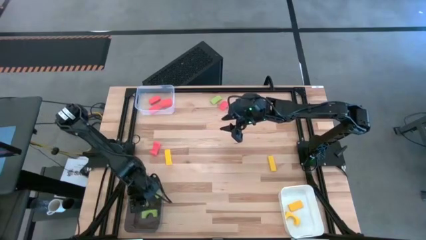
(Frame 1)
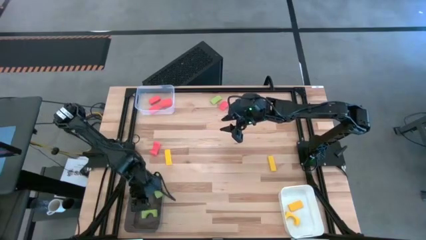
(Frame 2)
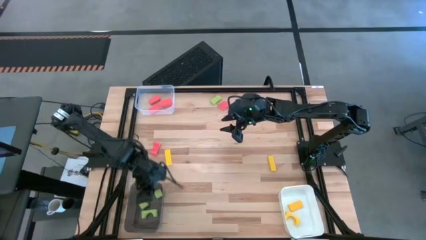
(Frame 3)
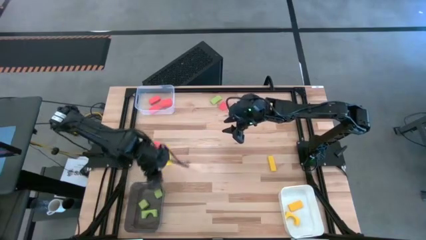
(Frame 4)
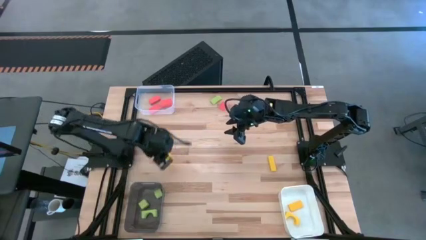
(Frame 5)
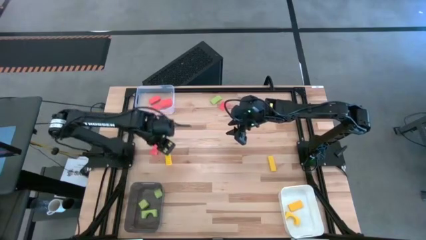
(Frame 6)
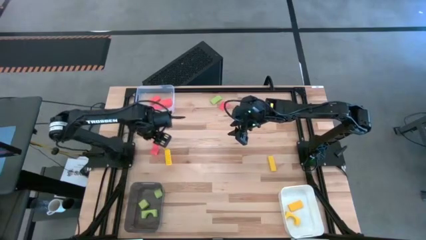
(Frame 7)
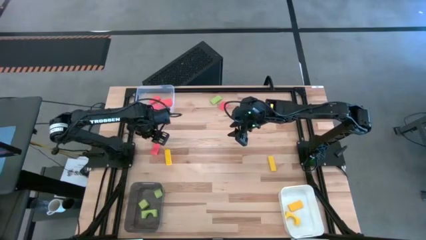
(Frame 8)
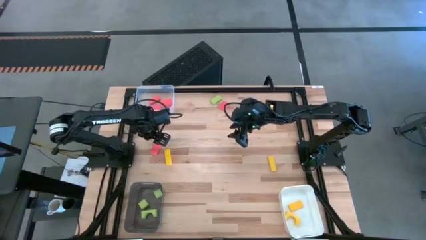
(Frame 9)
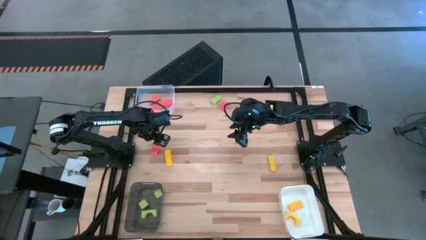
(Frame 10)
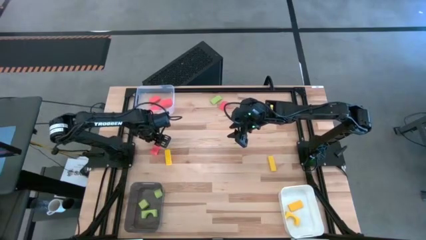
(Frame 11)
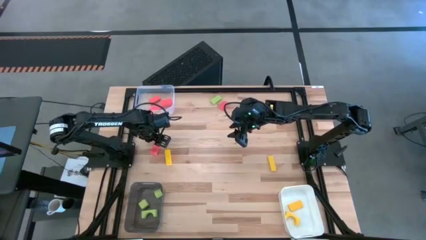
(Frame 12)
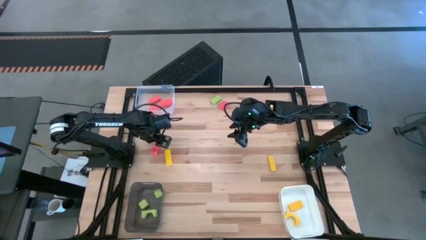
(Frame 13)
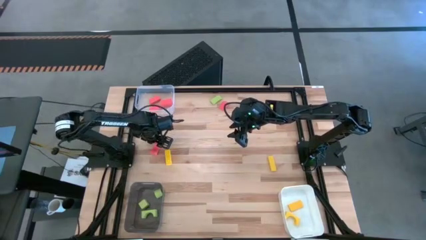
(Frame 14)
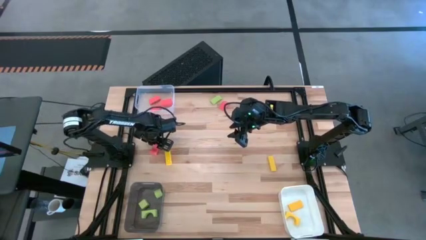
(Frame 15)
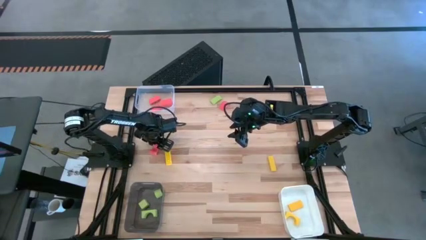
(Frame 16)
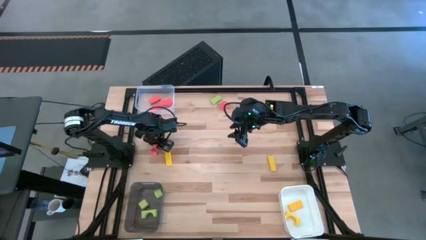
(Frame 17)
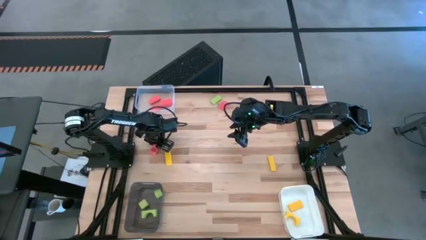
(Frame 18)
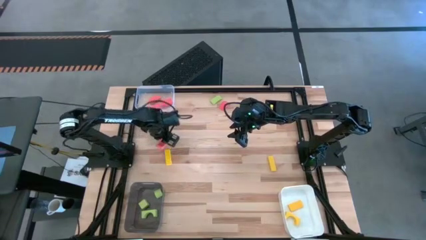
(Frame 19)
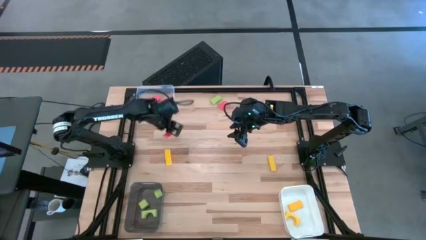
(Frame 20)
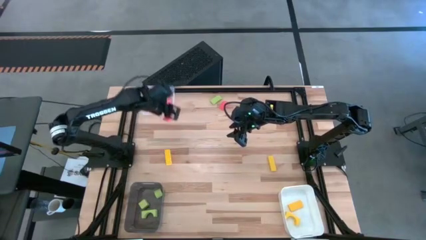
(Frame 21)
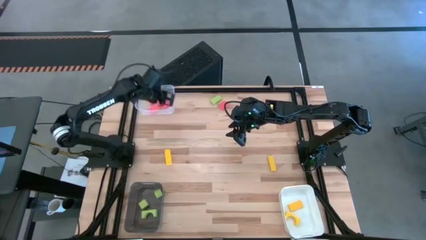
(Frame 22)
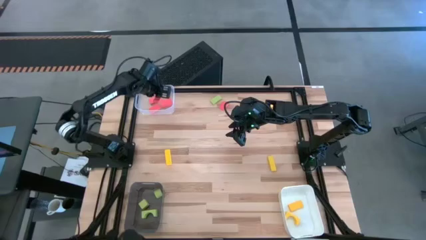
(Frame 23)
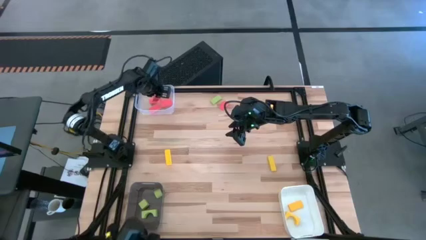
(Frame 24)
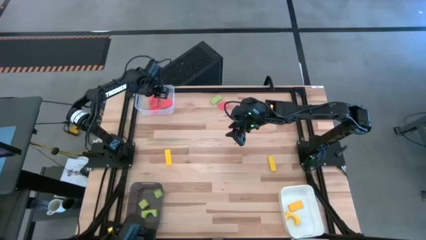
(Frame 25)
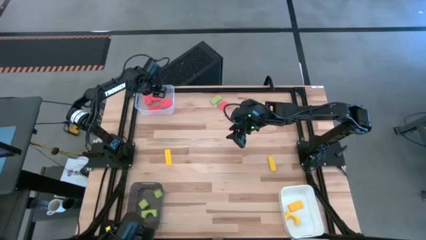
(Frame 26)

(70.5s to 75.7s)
Task: Sort & place blocks by color
Put the orange block into the transparent white bin

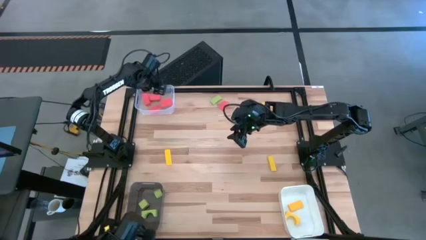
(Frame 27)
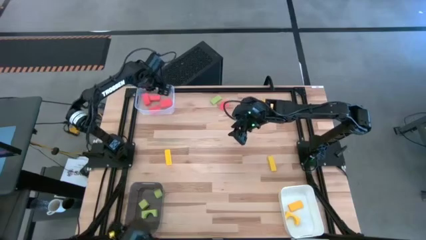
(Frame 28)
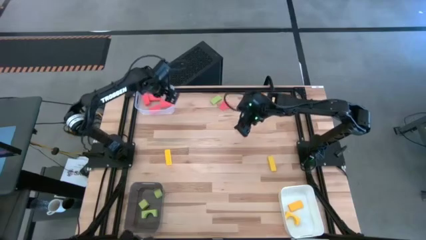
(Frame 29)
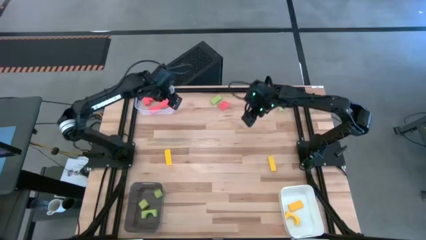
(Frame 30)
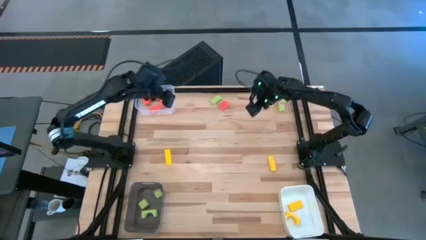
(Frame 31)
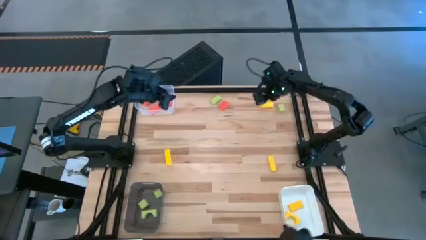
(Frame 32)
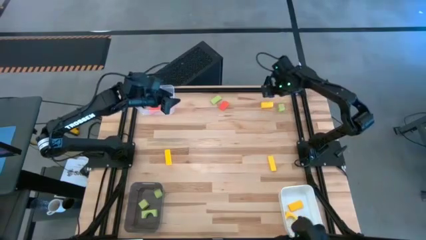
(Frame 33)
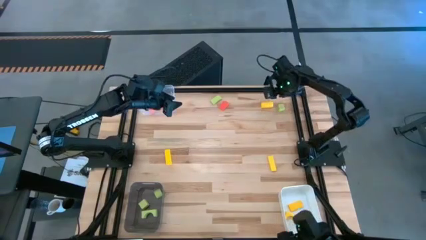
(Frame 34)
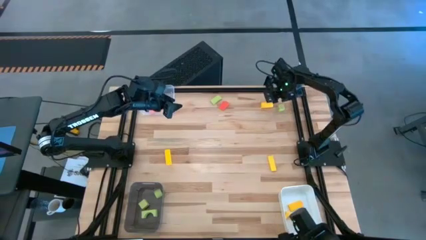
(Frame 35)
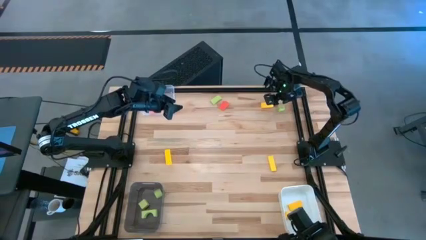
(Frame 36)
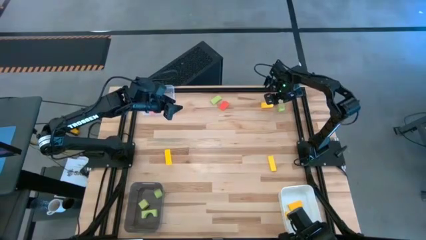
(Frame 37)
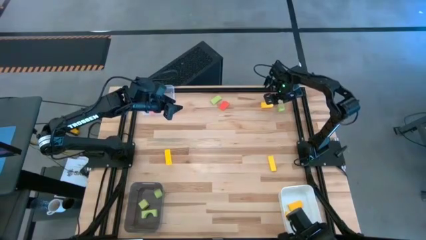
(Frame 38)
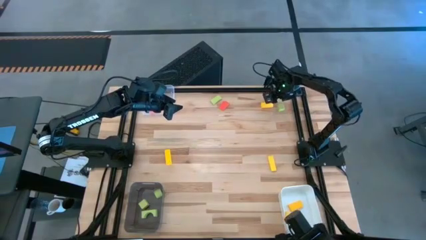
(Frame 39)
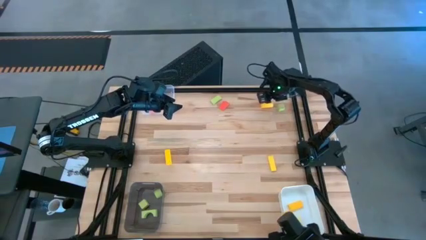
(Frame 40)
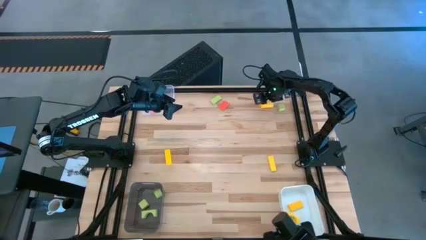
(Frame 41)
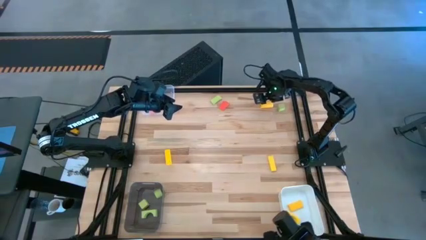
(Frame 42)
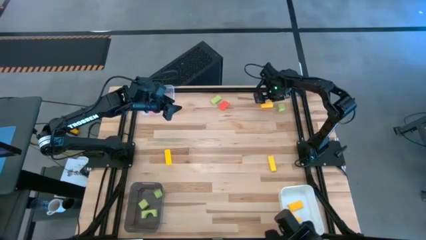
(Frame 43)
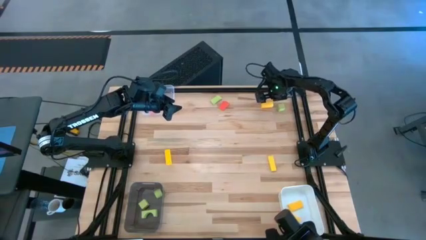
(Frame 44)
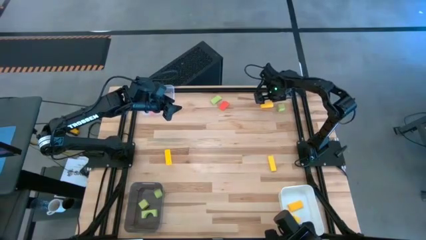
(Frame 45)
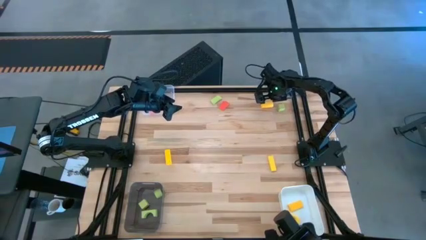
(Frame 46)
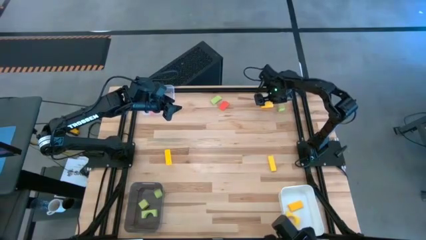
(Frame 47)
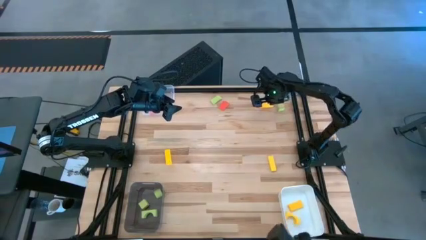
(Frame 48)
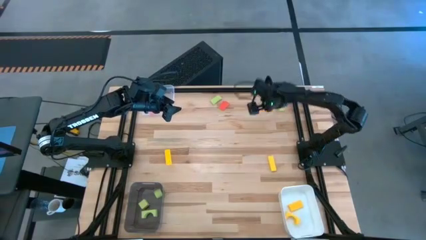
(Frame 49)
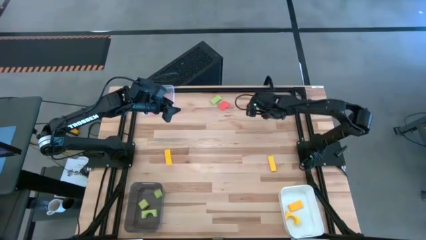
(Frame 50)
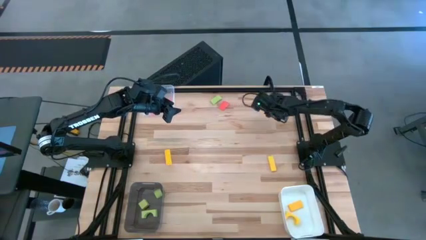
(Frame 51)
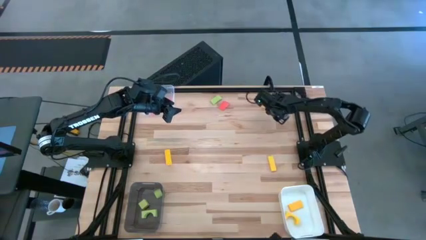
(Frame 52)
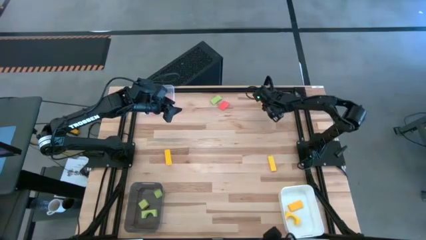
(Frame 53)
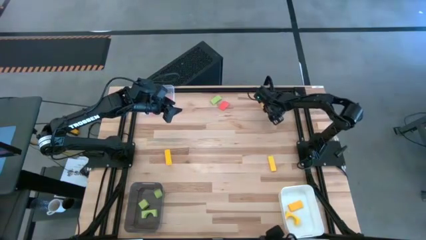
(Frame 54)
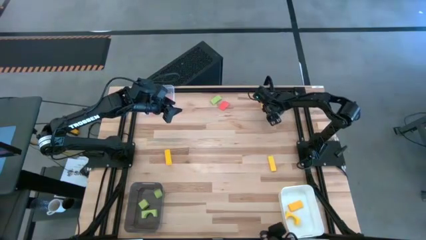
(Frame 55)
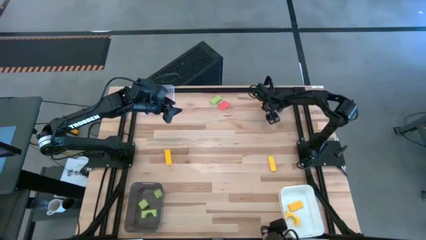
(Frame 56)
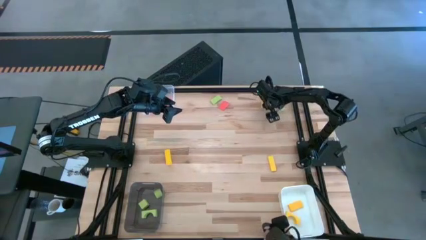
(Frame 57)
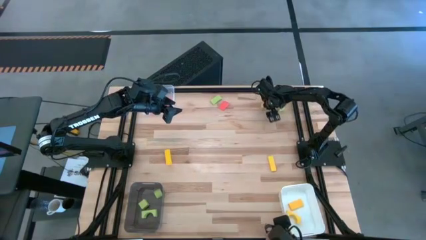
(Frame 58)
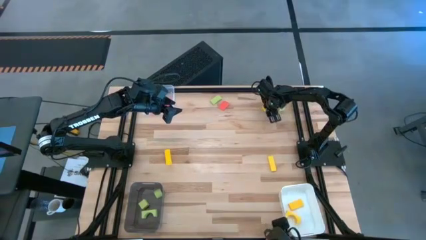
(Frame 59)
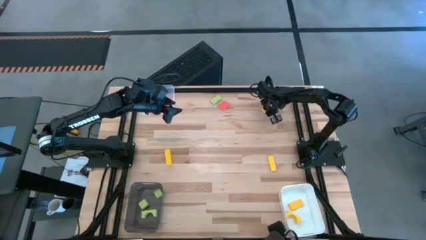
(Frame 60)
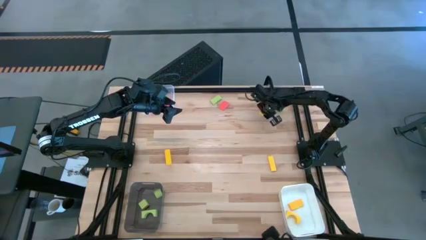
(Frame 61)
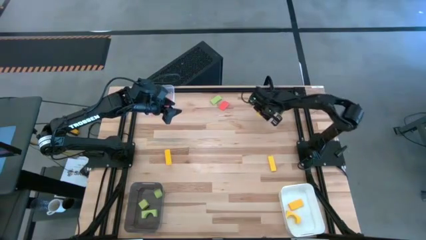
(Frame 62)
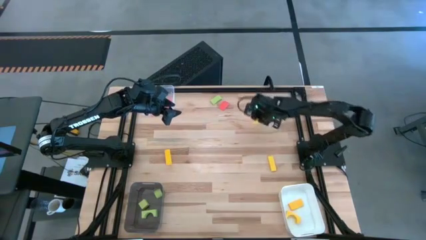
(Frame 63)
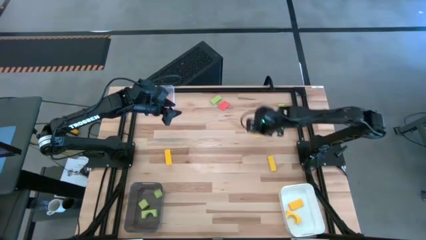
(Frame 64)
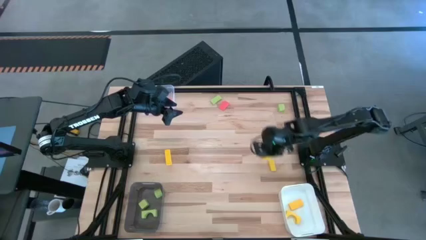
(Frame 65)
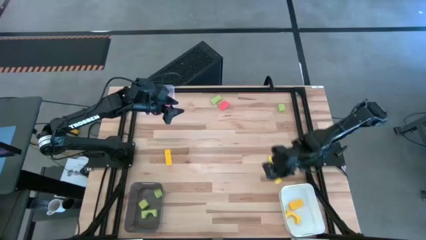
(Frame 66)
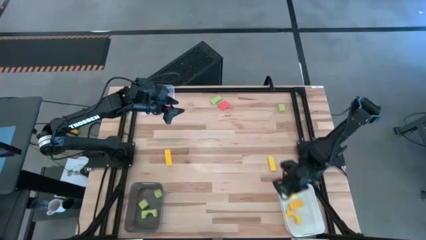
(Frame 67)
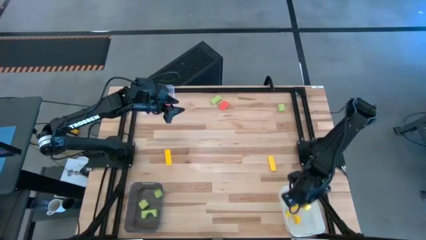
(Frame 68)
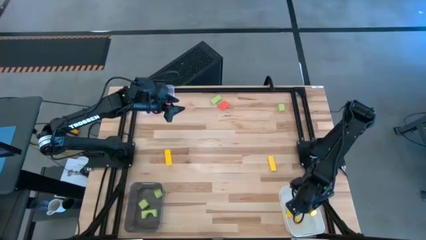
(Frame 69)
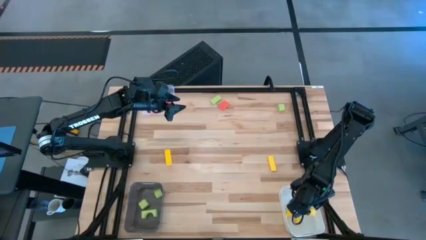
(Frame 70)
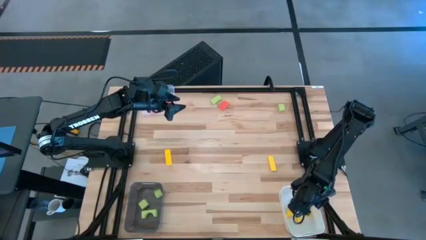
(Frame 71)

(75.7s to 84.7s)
Put the yellow block into the white bin

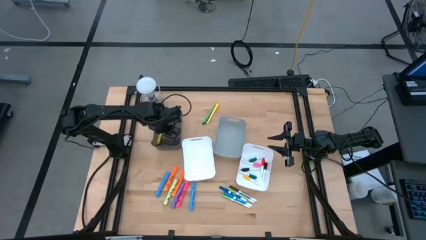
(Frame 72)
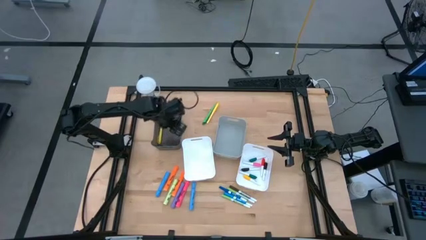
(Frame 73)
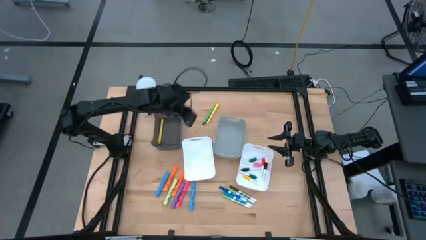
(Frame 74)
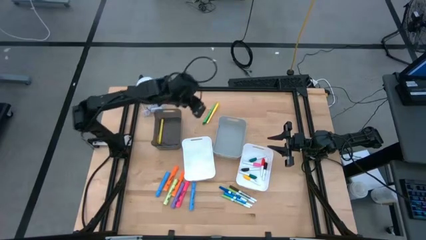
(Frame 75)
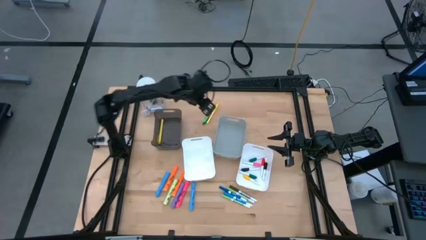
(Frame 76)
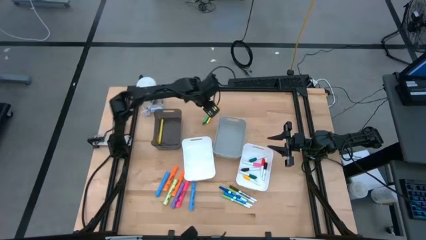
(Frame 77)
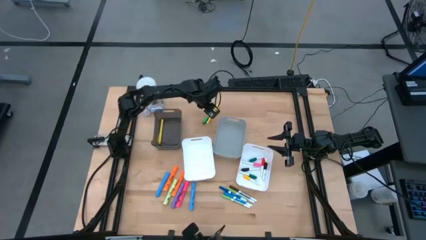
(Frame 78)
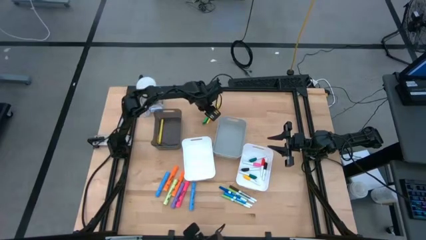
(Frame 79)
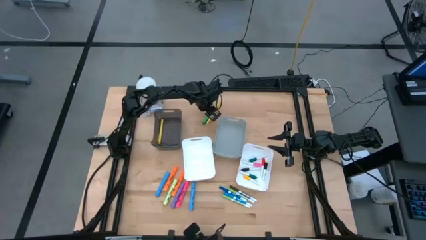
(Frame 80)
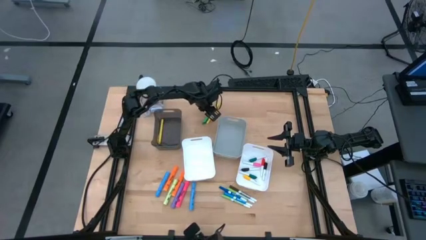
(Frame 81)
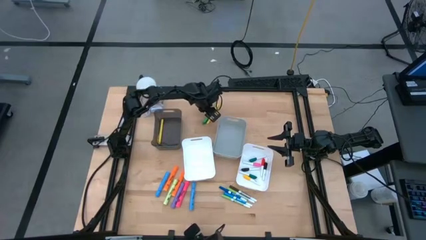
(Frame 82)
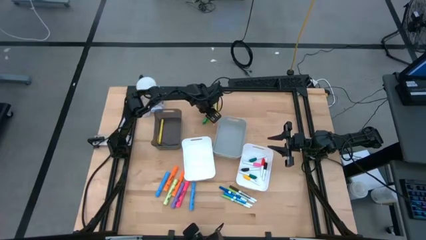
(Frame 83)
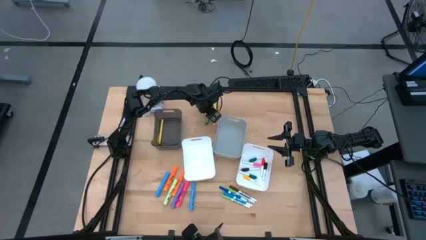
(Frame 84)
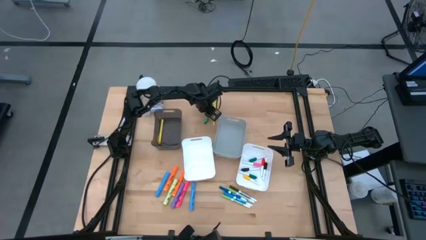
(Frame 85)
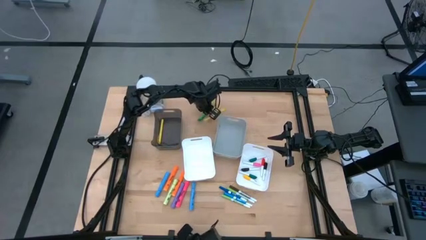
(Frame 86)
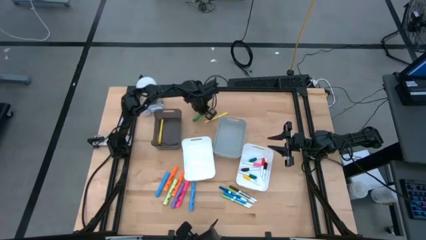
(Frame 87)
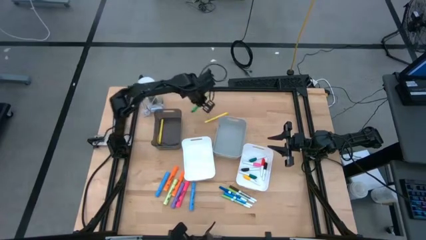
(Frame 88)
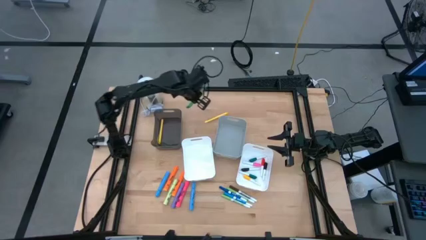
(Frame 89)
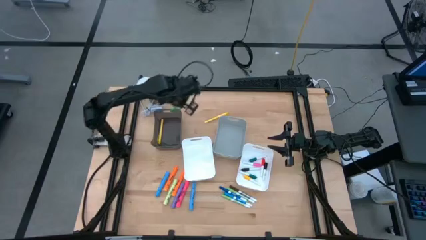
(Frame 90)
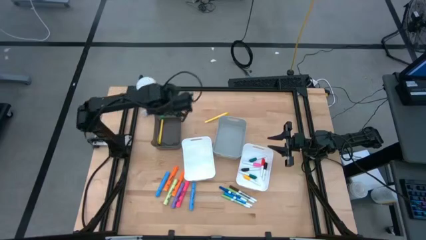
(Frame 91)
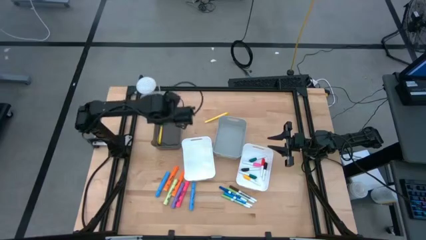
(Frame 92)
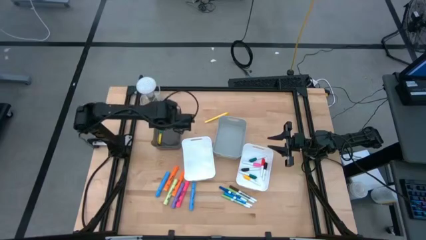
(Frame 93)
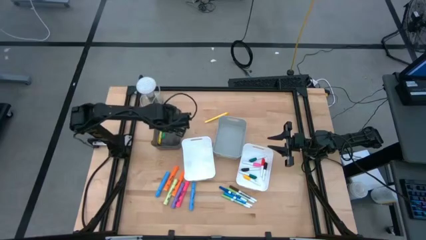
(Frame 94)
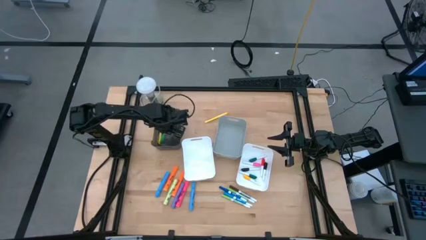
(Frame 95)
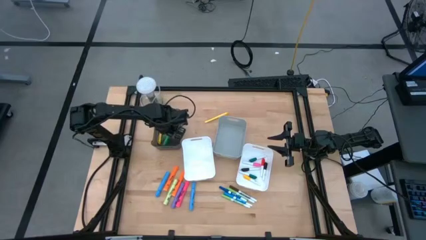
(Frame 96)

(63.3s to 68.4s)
Task: Pick & Place Markers
Put the green pen into the black bin
